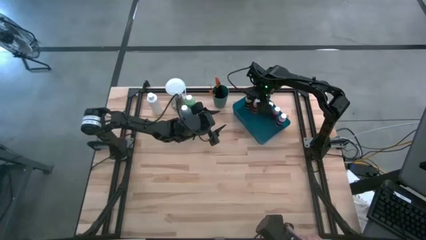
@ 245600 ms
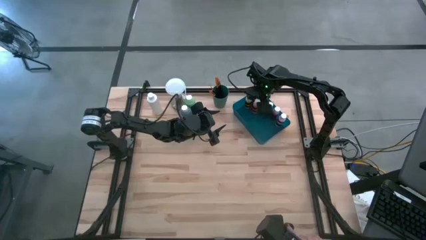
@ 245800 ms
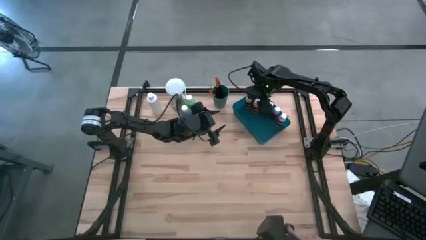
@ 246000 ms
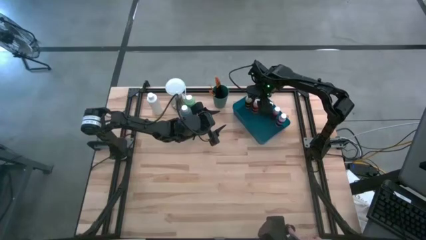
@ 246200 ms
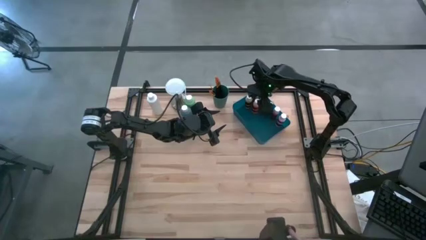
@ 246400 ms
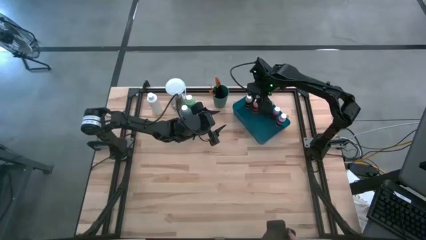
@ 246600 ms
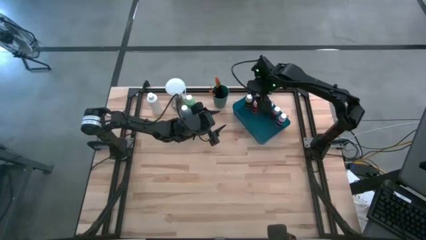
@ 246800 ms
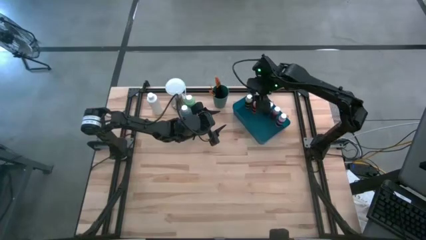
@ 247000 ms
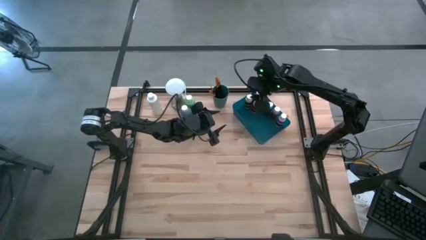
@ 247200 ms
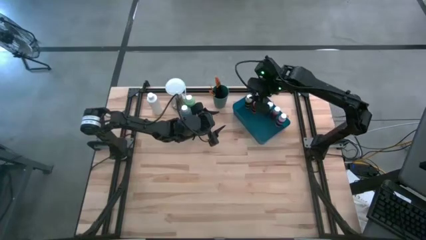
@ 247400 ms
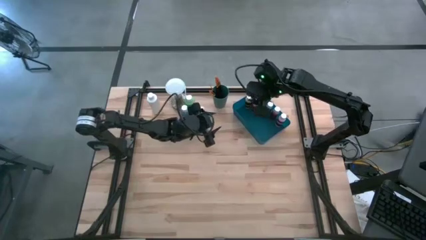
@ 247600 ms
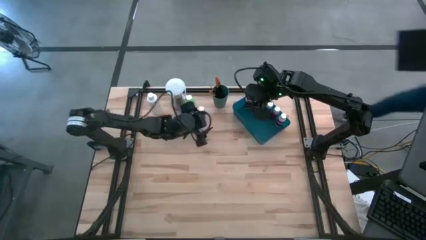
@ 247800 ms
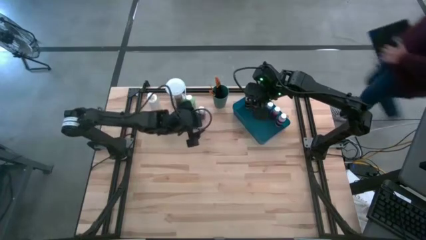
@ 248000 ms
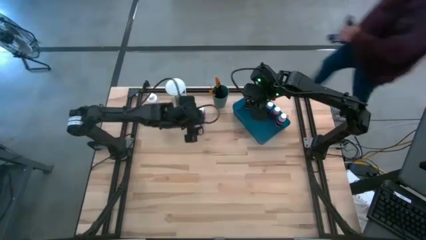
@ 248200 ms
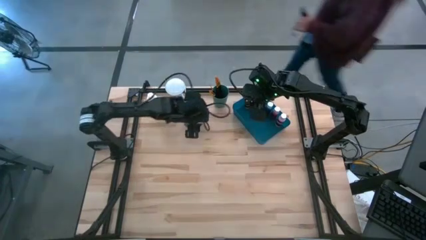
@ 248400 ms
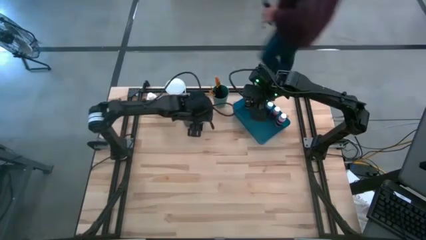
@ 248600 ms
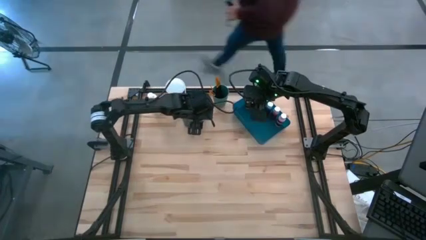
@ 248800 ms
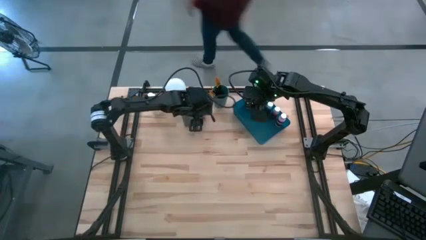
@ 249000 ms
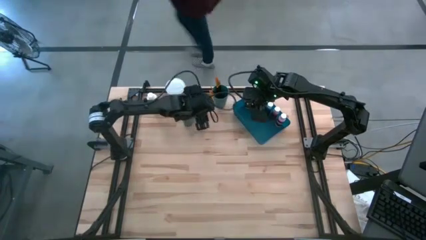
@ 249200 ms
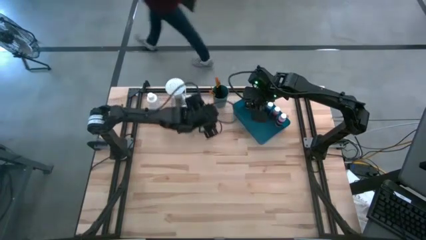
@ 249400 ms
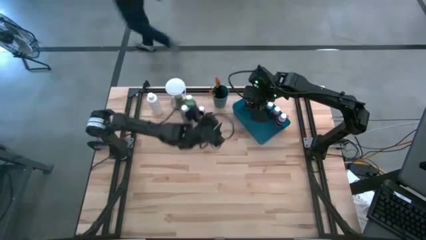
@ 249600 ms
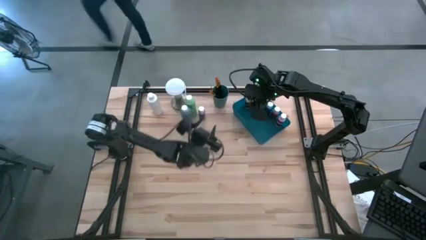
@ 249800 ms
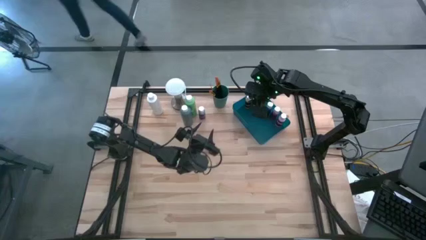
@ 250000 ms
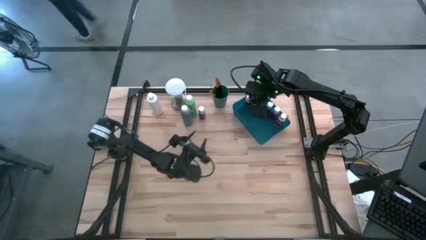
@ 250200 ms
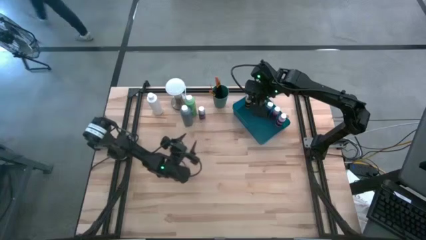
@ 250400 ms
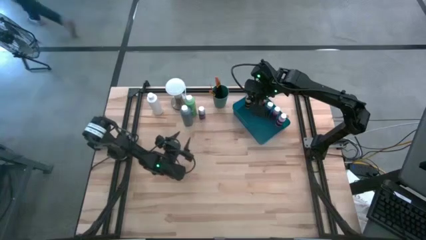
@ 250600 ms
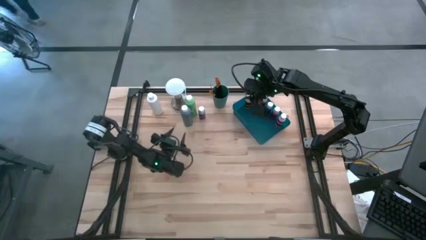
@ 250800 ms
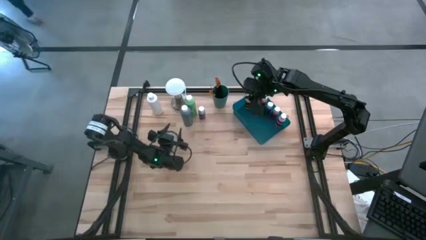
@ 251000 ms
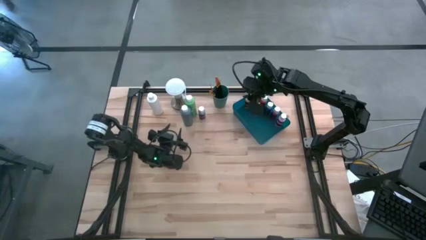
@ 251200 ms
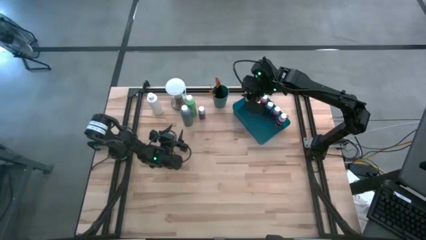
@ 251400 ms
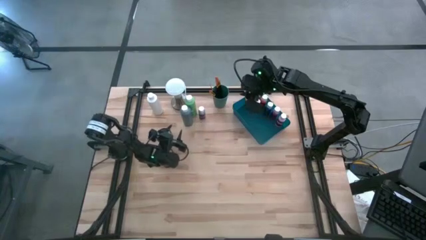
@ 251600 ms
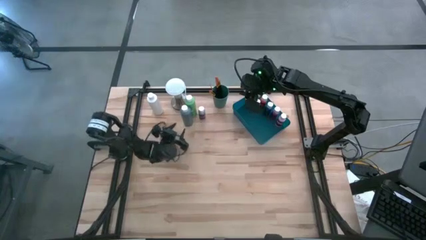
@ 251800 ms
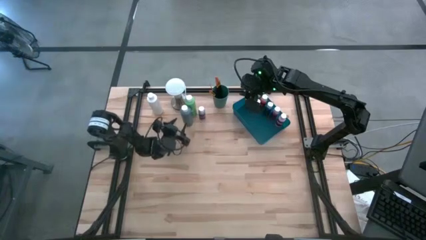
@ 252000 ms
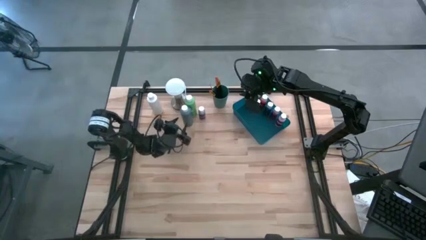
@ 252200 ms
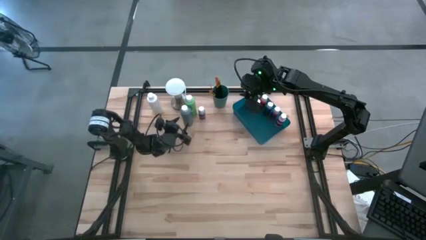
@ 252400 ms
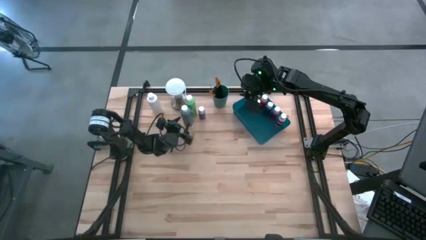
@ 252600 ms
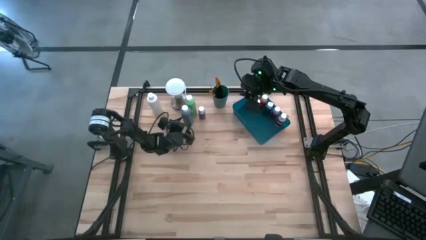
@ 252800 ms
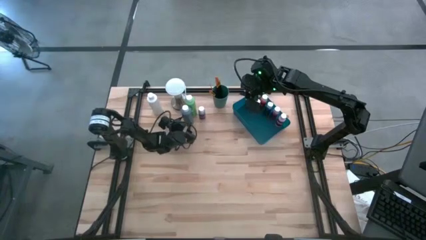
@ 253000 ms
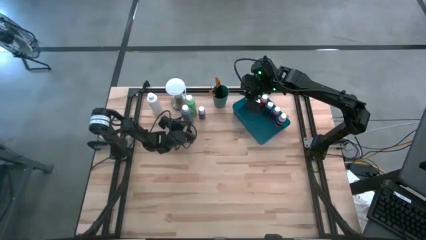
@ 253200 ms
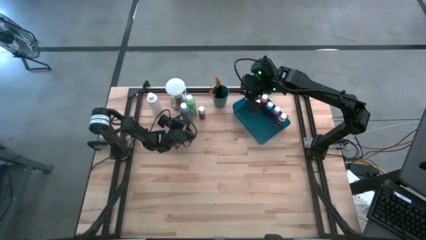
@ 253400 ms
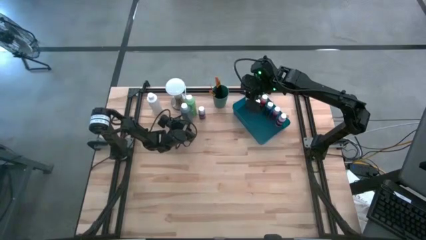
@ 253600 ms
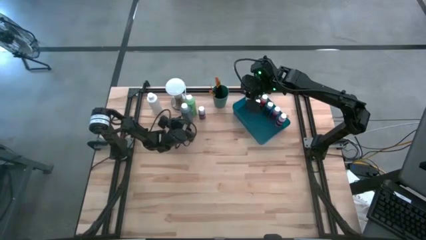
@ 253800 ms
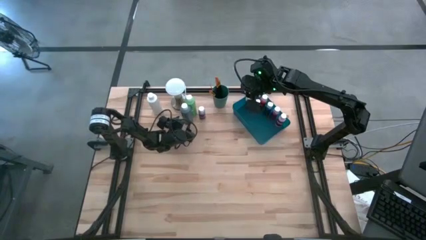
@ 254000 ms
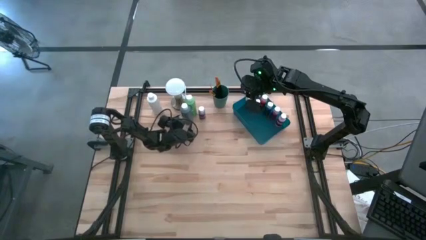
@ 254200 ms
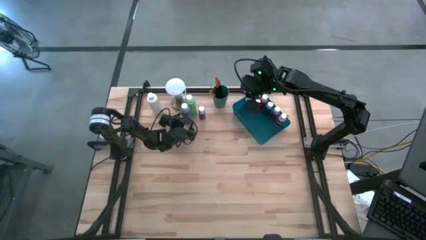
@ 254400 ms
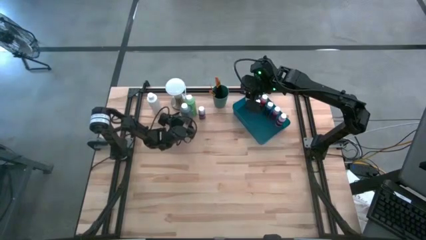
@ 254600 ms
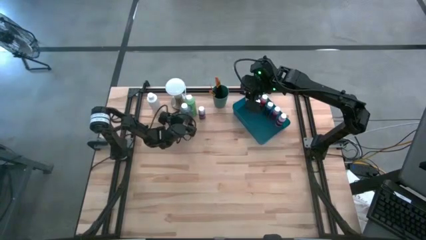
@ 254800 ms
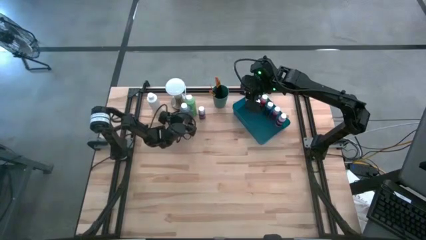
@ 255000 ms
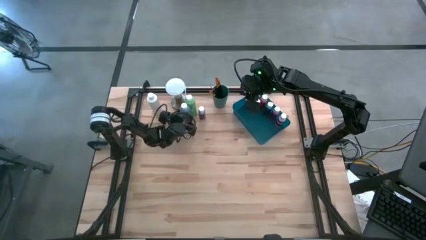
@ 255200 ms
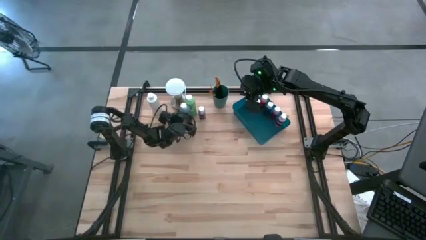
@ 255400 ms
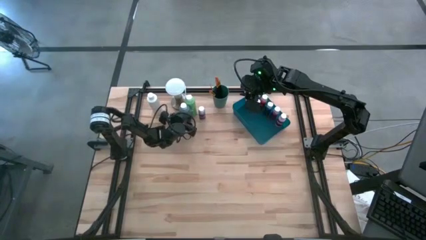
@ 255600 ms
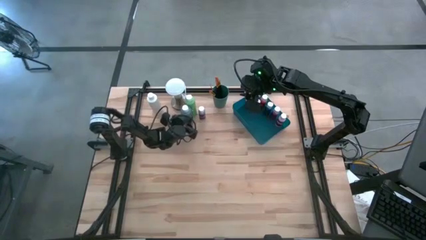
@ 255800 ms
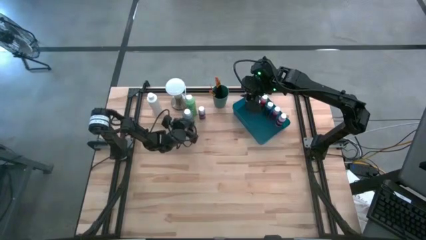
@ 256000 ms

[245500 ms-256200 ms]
Task: Pick & Place Paint Supplies
Put the large blue paint bottle into the blue bin
